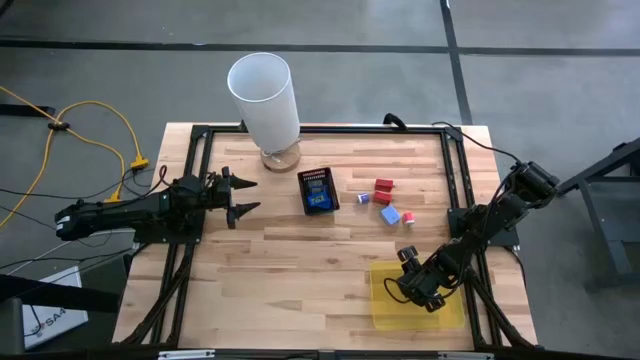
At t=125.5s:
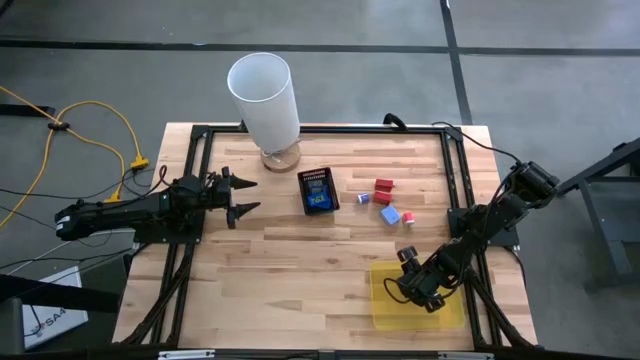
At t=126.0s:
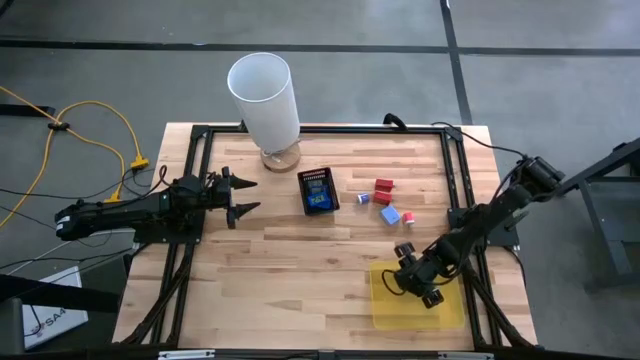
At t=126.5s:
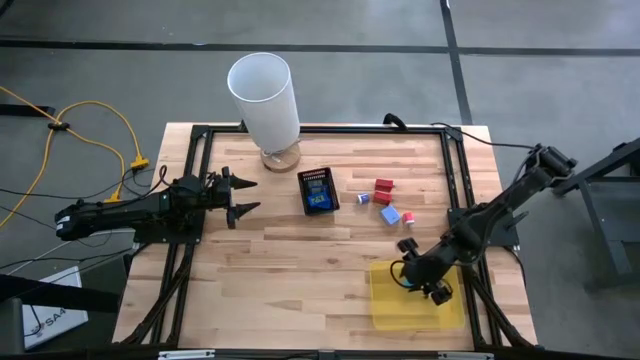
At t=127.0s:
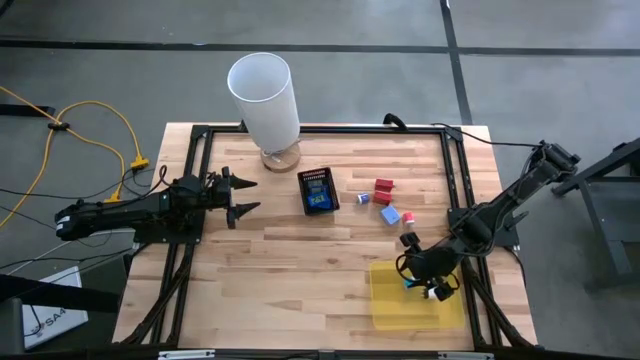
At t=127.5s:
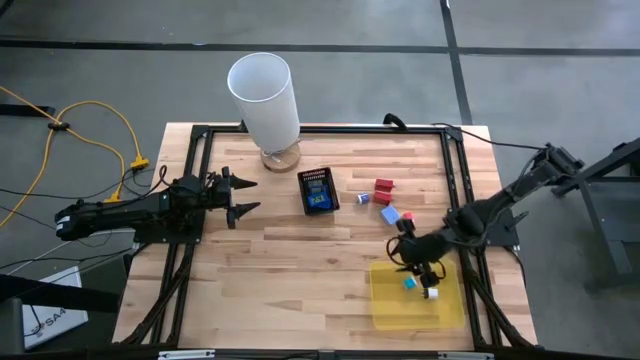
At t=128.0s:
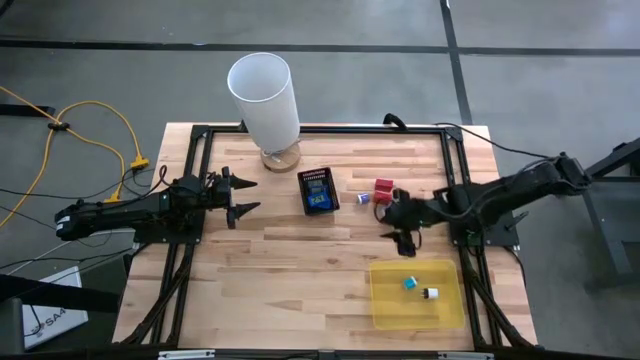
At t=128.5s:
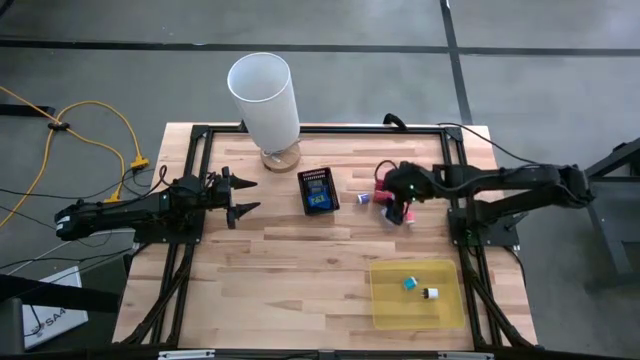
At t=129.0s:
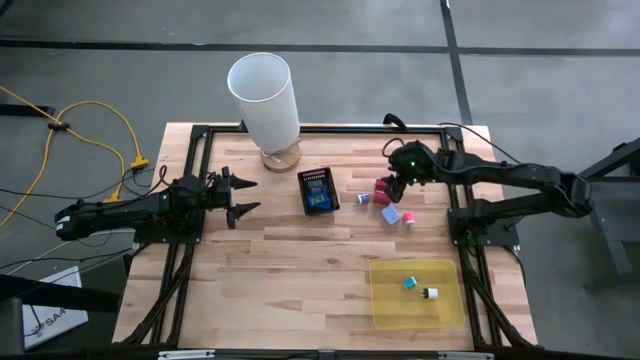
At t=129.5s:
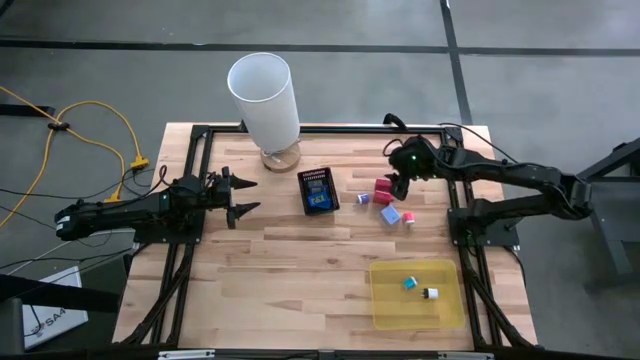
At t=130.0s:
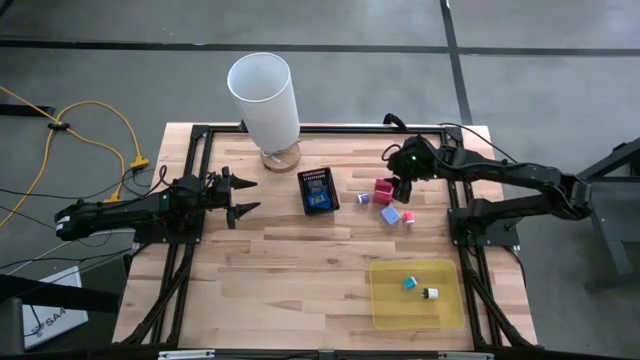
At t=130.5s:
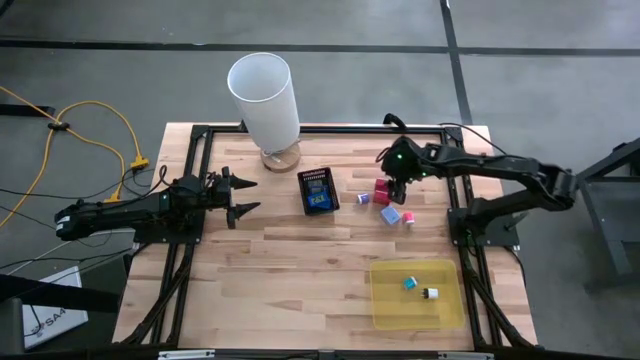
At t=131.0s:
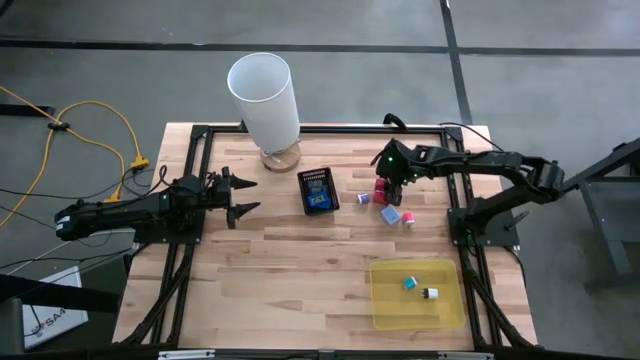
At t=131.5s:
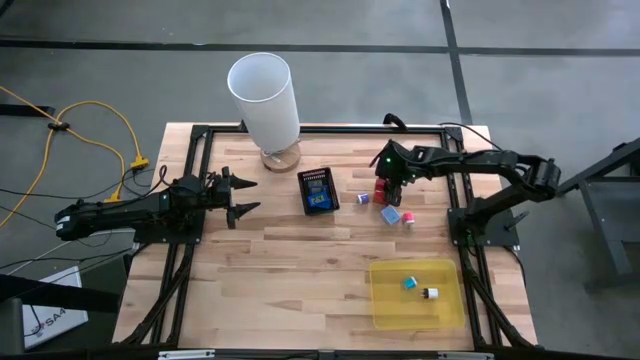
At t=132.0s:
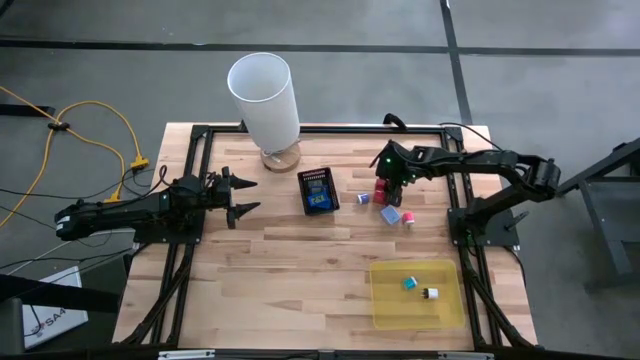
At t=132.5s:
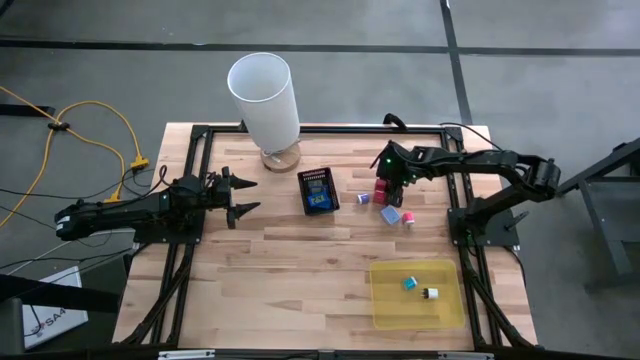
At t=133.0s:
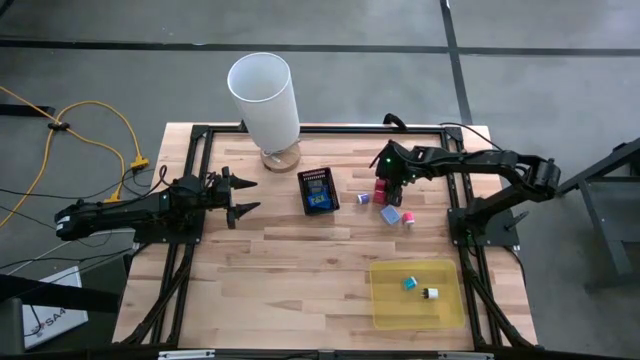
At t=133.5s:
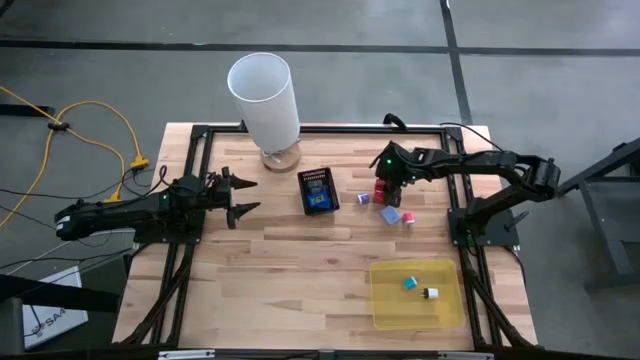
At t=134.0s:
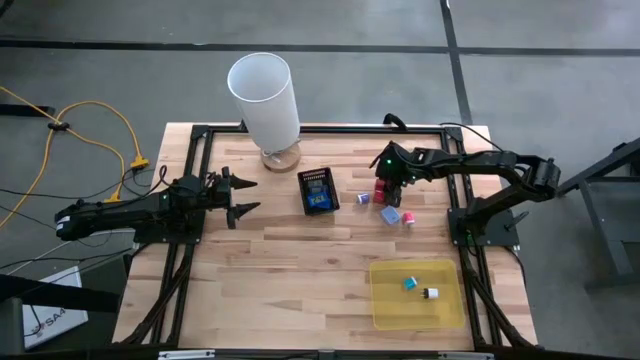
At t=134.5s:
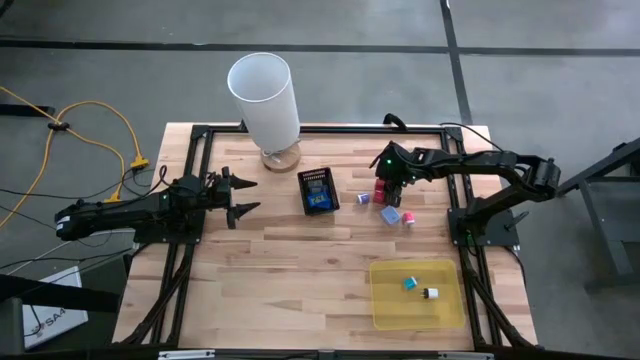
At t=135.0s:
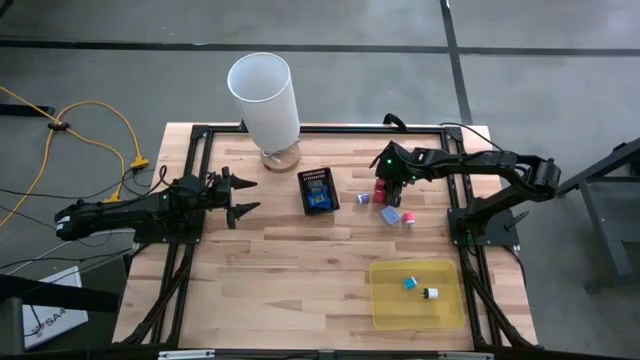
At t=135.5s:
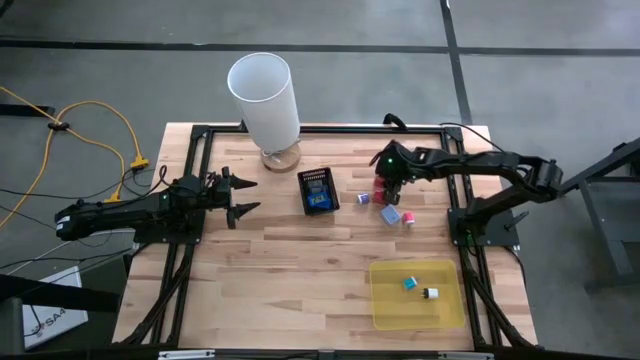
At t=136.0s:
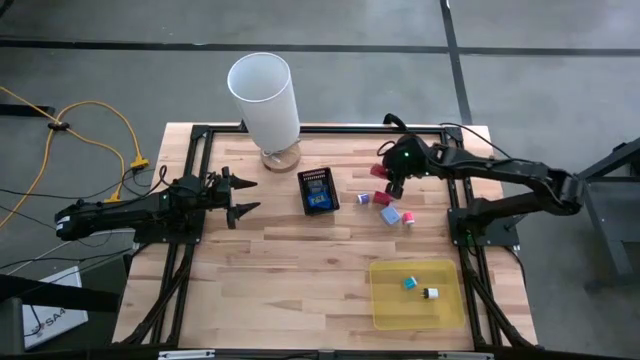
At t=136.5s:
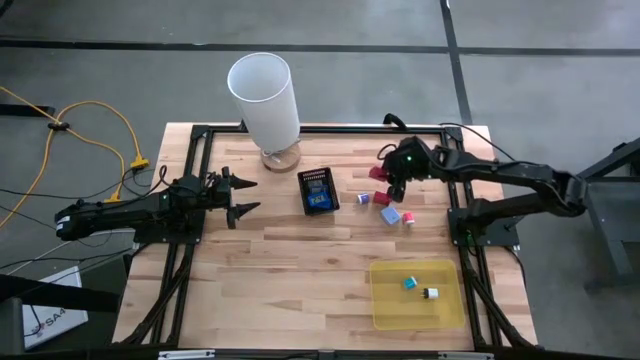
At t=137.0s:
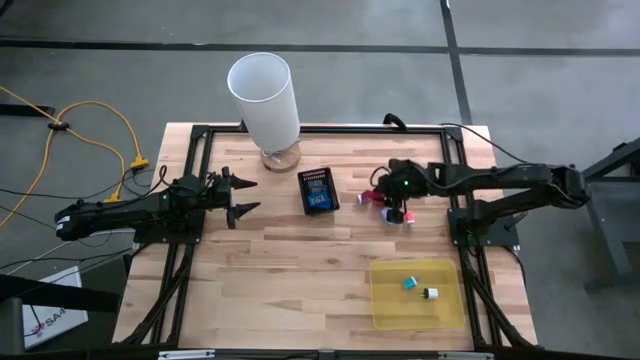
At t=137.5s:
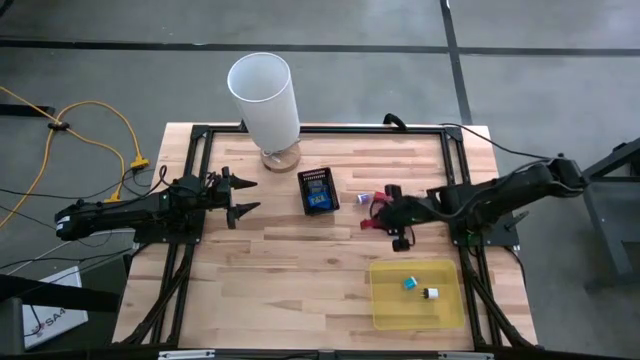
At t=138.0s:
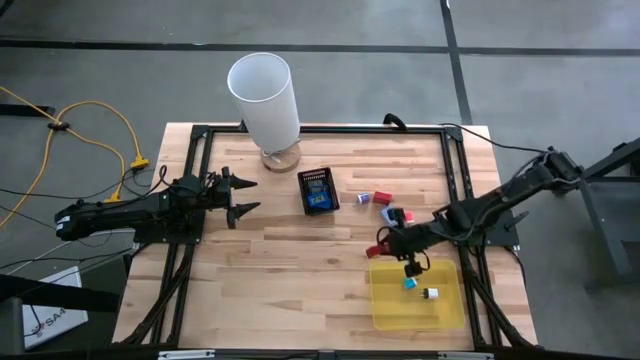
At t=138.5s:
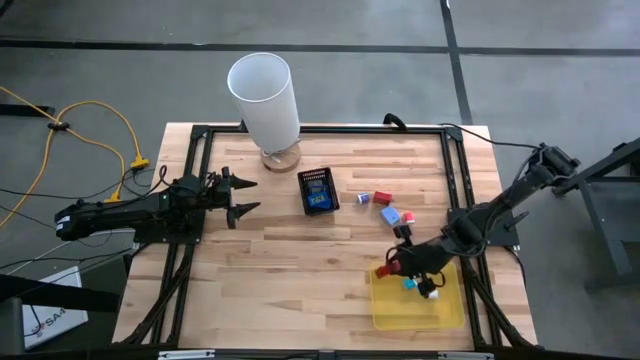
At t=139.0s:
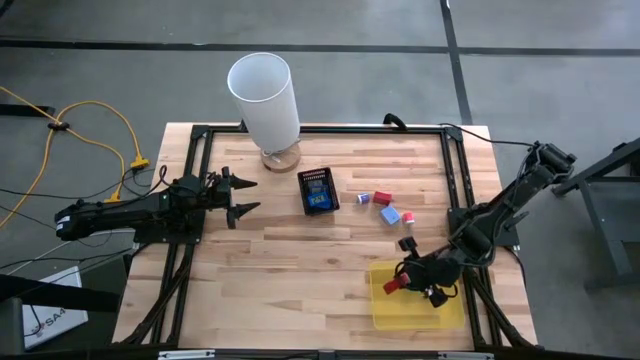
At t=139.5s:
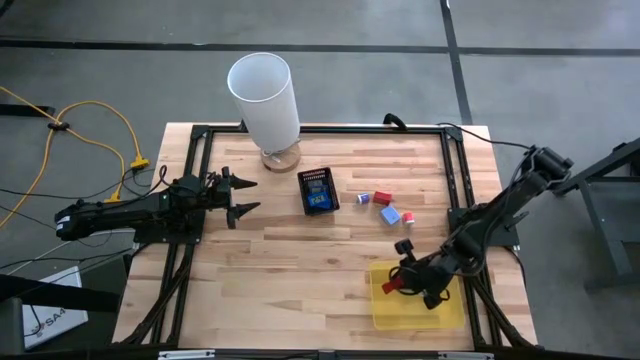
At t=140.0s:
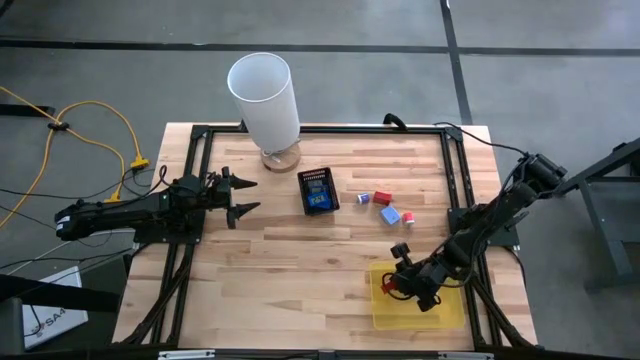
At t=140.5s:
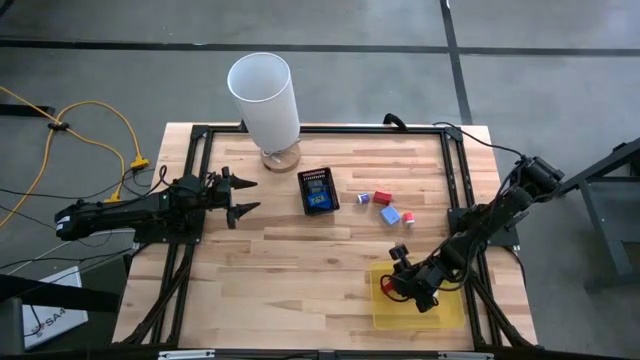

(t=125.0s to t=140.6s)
Task: Pick & Place Office items
Put the top red charger adaptor into the yellow bin

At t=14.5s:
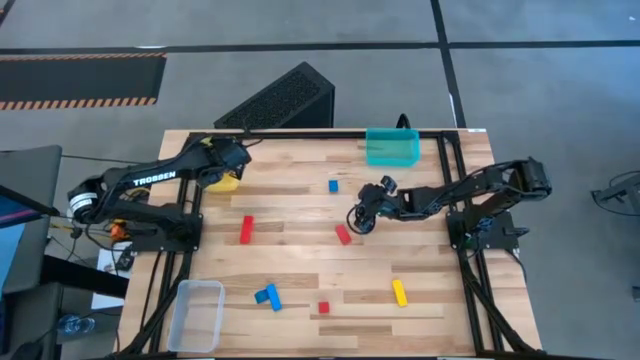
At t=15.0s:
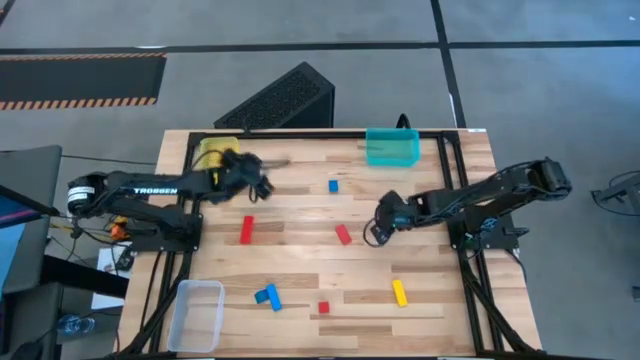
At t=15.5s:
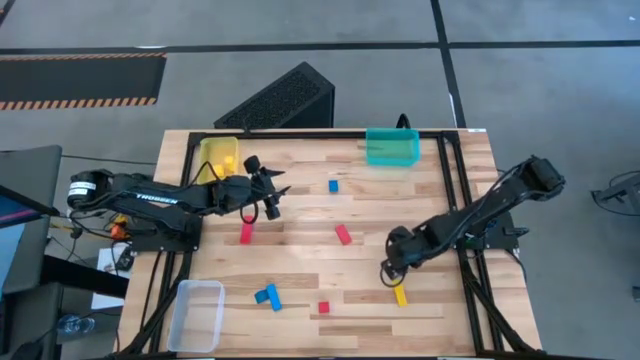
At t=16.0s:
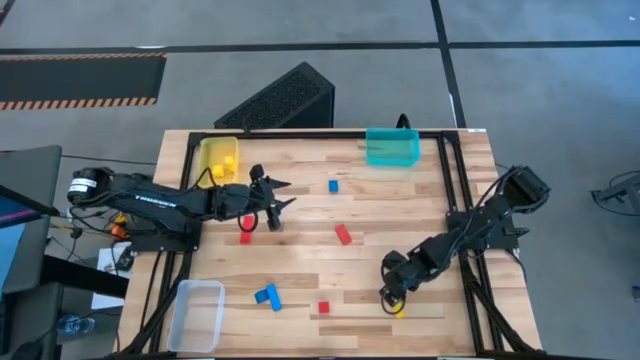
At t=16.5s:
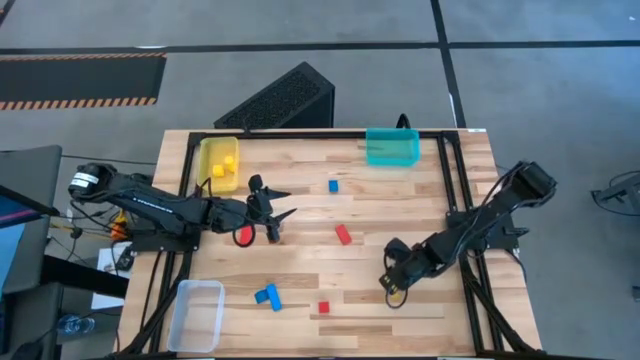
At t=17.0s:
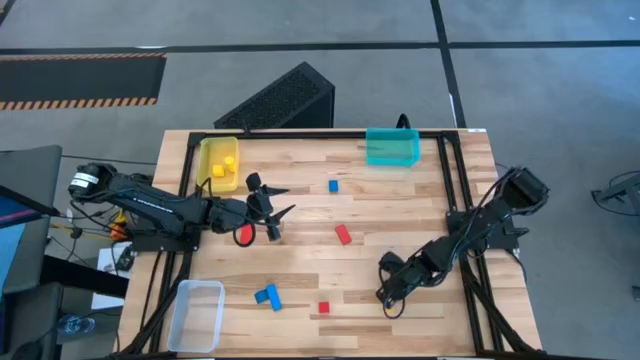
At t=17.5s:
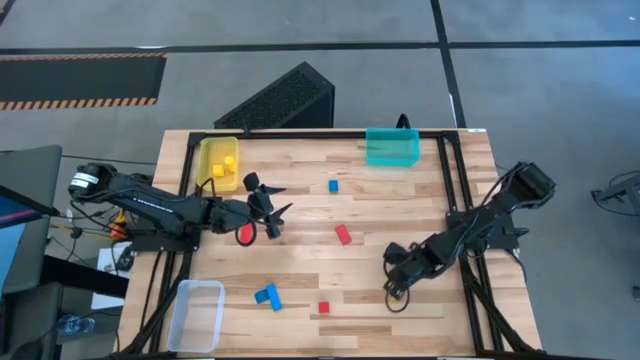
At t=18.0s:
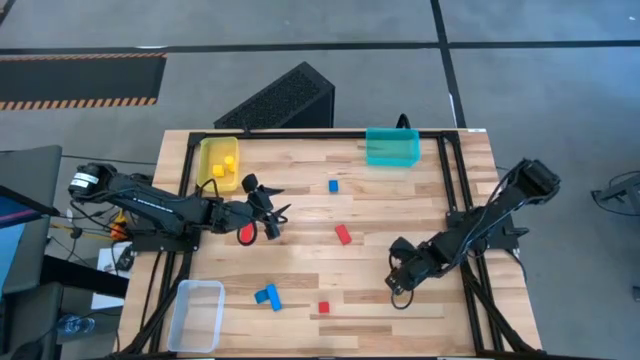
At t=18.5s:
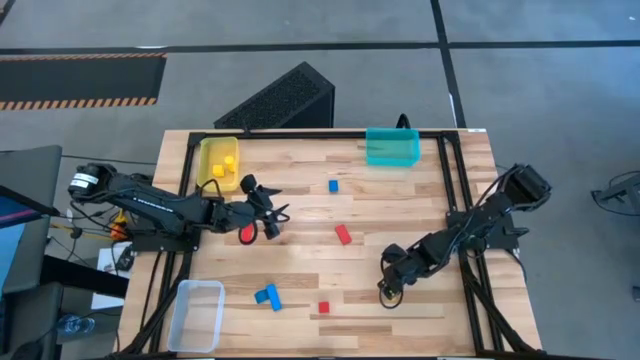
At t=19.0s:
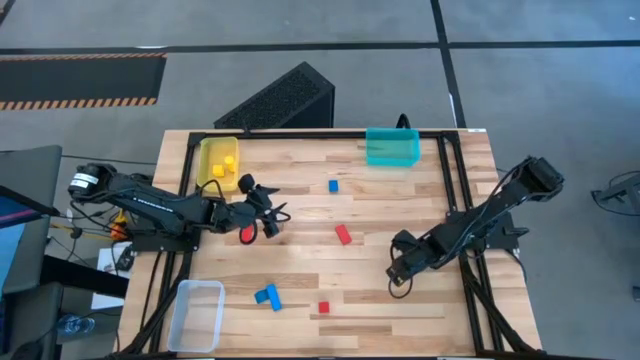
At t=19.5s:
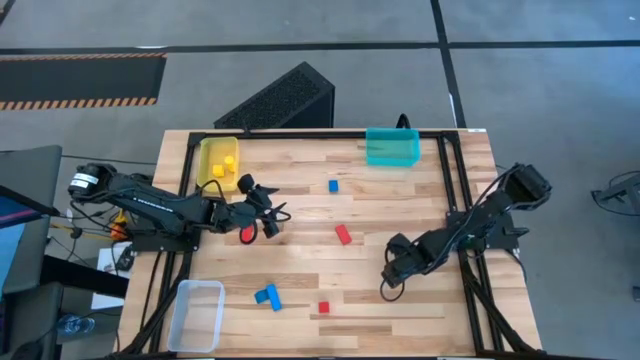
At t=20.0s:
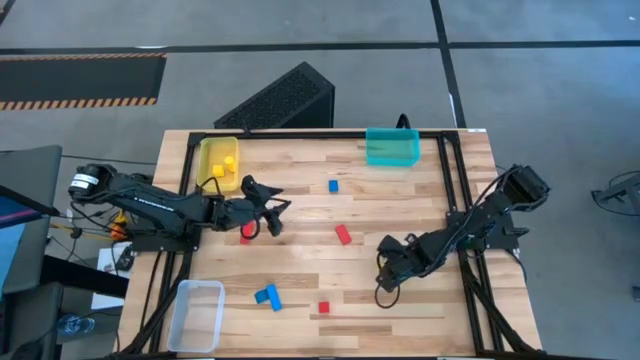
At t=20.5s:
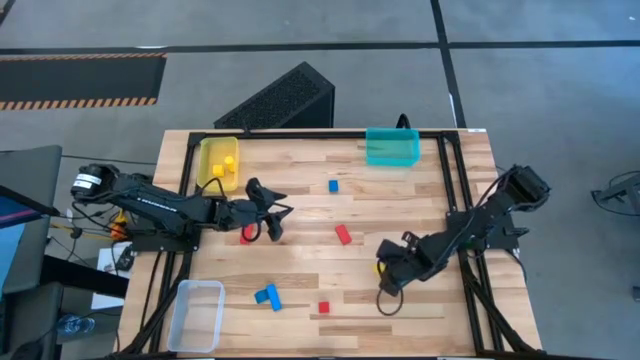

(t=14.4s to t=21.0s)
Task: Sort & place blocks by color
Put the yellow block into the yellow bin
